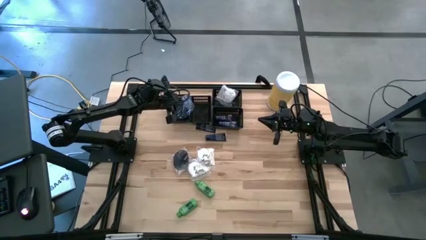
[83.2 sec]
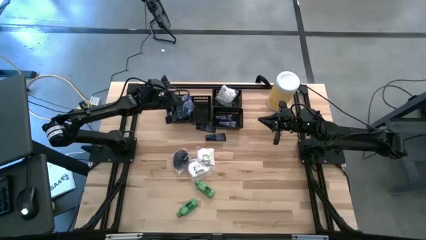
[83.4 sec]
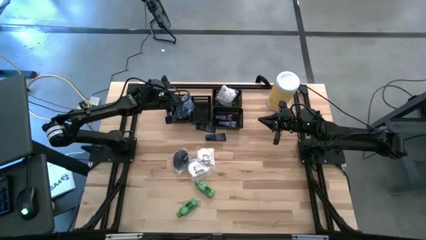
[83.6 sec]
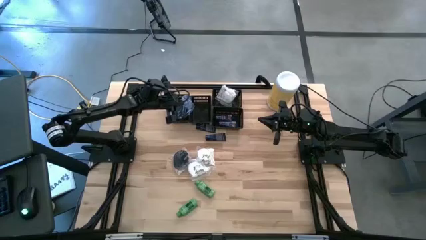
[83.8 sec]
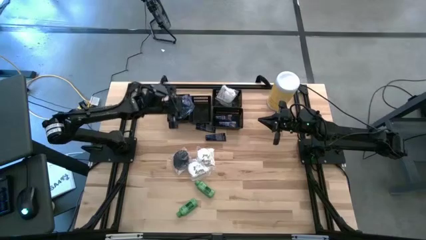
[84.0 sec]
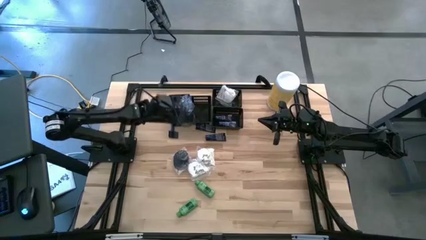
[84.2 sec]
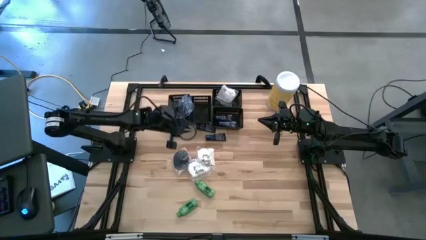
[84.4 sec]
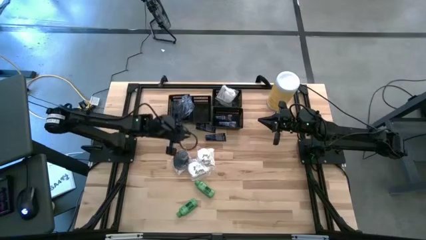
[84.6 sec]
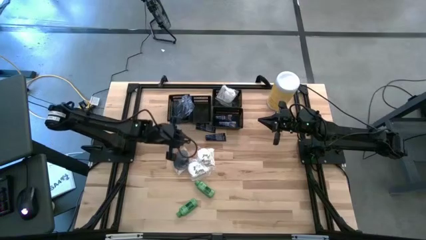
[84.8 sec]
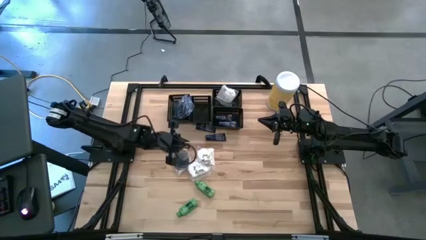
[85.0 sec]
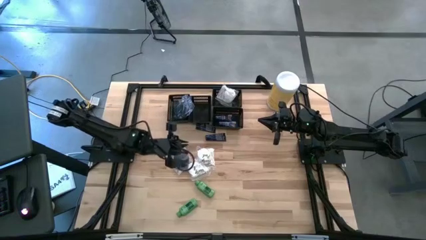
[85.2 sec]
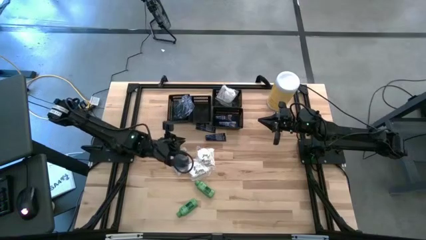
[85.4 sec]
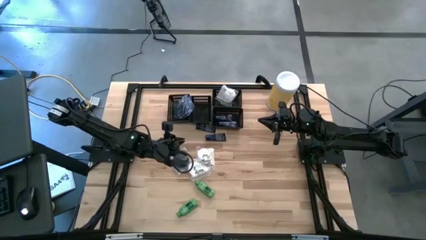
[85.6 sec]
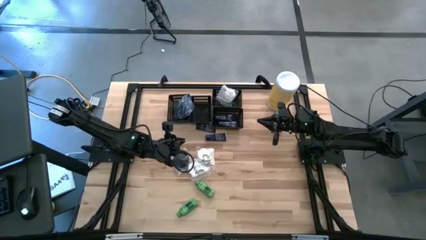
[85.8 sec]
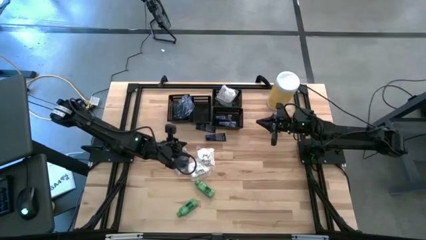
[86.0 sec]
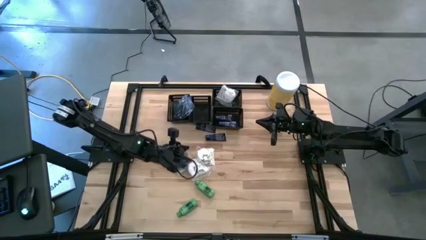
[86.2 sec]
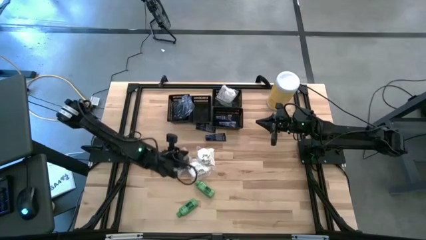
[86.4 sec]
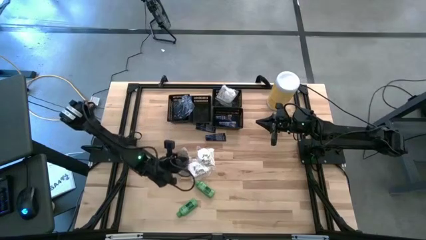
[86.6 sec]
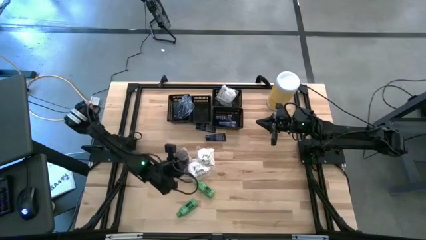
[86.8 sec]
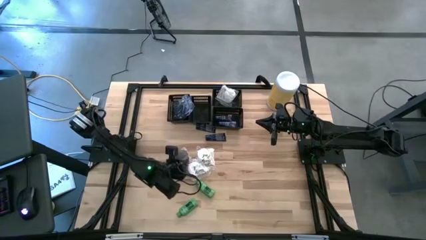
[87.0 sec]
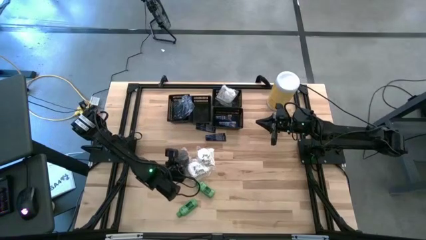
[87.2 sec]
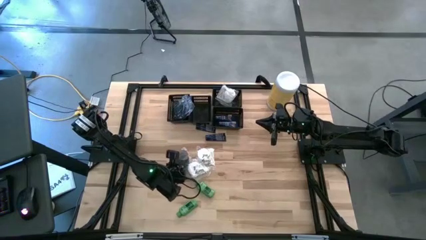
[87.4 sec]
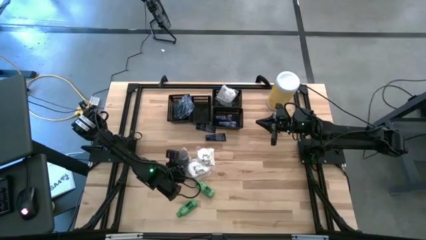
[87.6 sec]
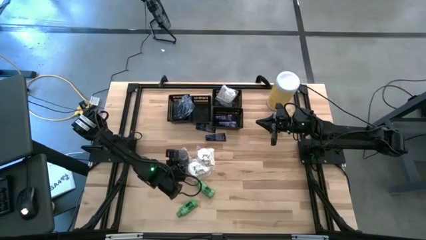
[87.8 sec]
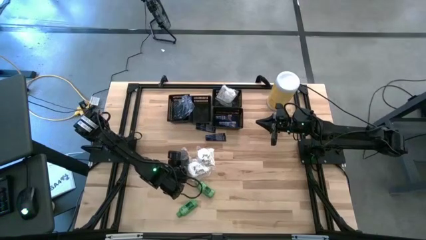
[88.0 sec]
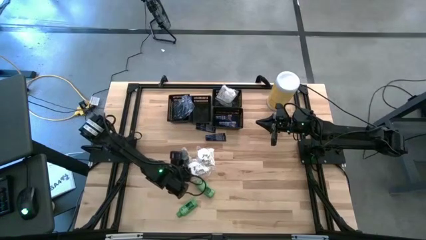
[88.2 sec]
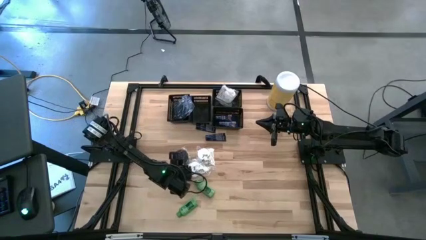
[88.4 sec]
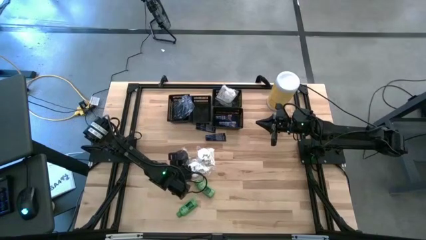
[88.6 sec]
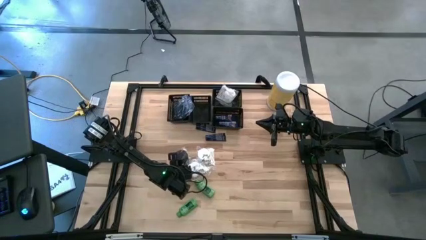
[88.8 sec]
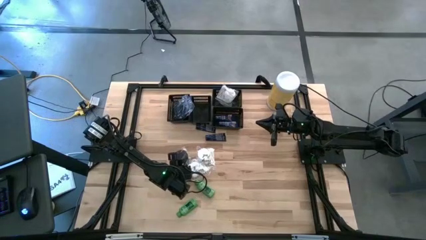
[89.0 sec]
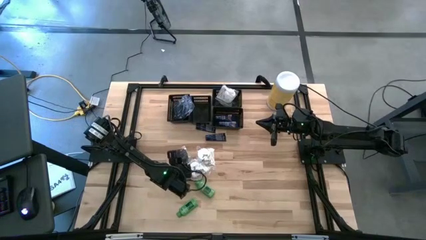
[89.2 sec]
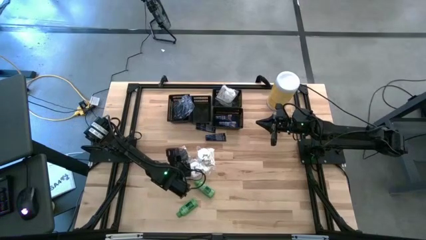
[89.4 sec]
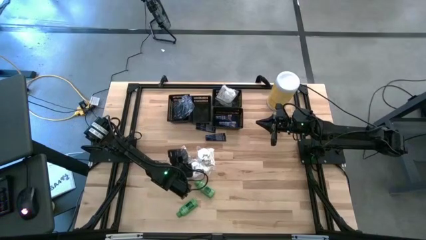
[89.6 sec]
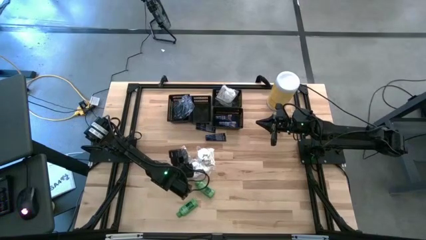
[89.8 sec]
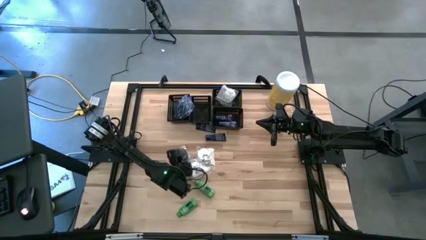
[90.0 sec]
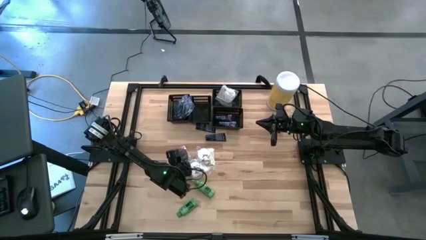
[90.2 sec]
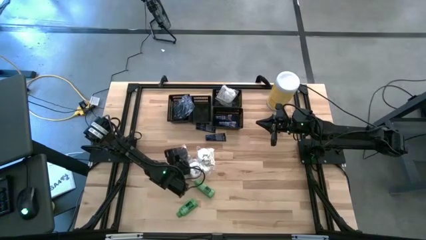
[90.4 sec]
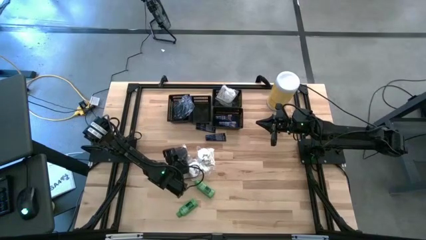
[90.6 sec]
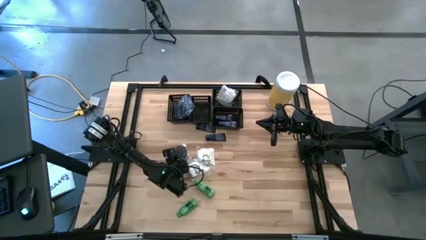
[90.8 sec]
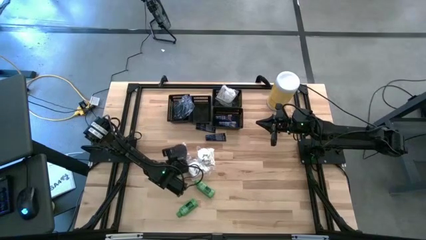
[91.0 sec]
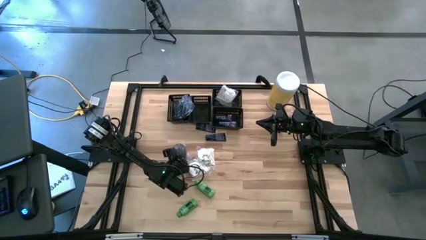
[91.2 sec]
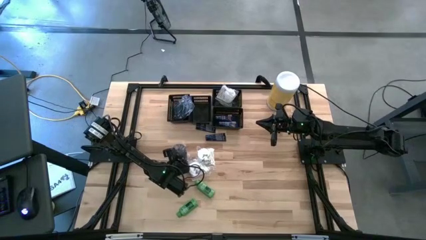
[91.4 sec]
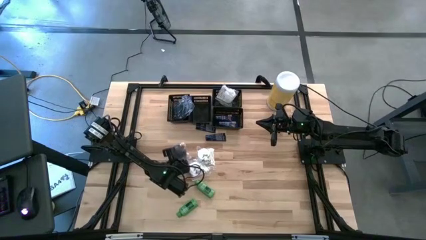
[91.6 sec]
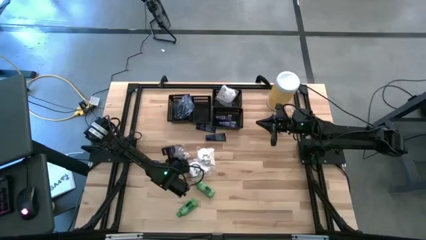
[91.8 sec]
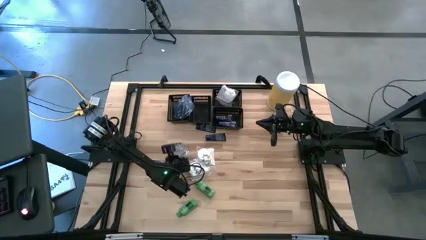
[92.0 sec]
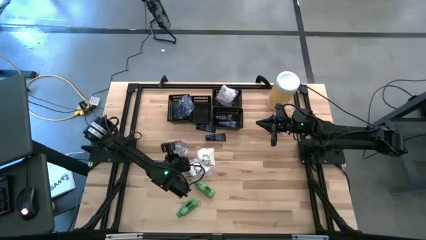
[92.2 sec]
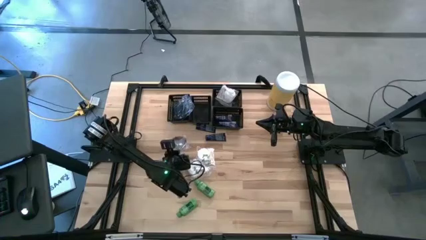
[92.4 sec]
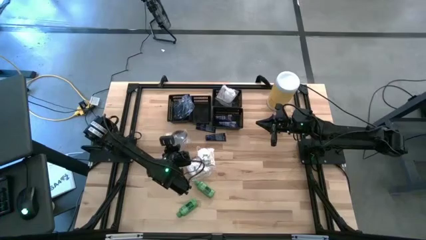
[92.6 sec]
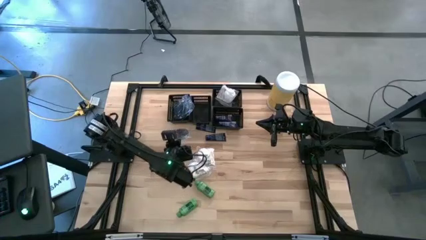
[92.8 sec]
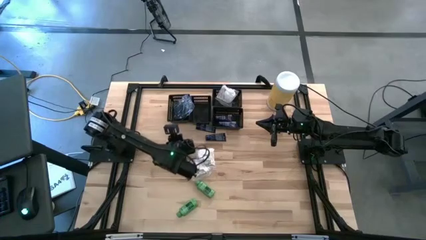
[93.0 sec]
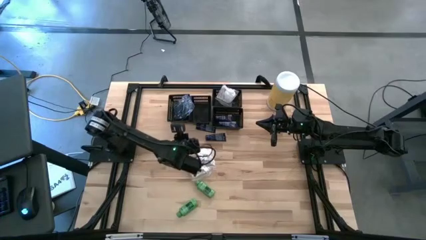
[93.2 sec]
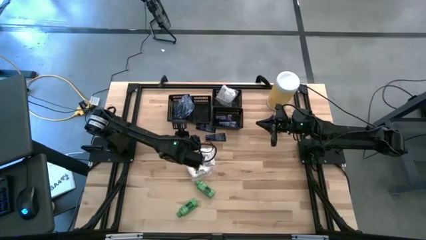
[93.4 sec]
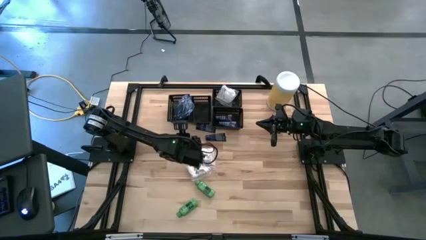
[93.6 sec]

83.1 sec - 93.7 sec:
Task: Pick & Place Travel size toiletries
Put the black hairbrush into the left black bin

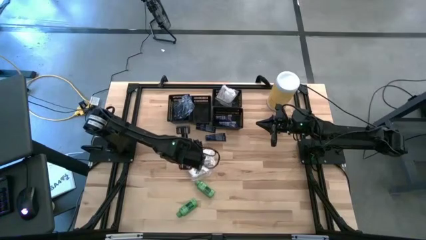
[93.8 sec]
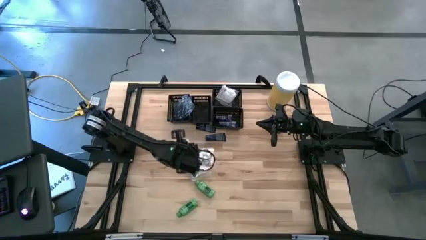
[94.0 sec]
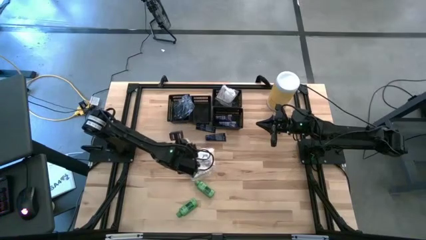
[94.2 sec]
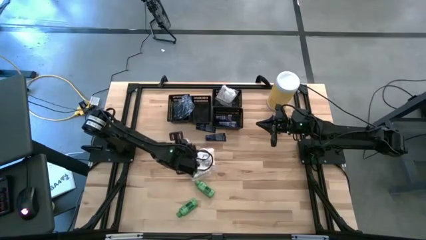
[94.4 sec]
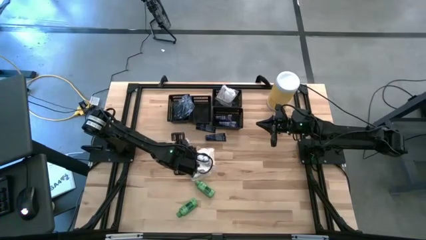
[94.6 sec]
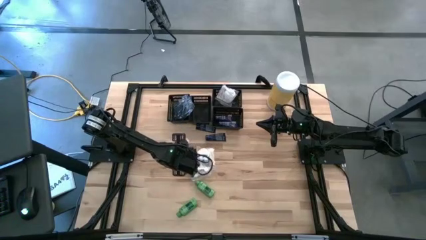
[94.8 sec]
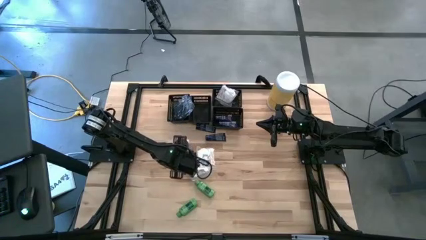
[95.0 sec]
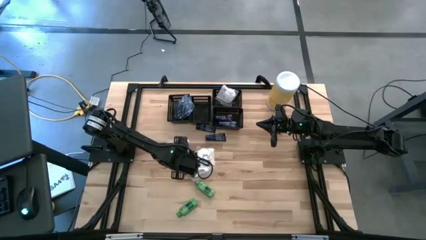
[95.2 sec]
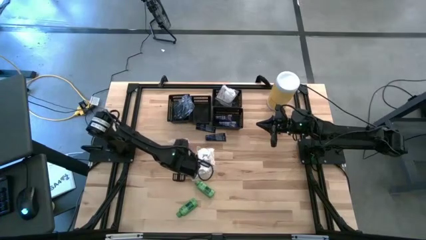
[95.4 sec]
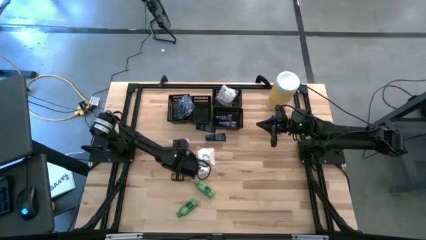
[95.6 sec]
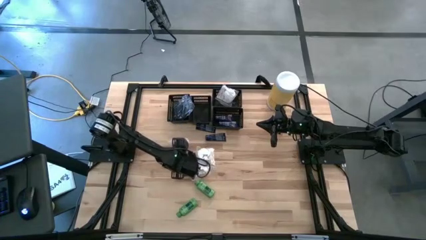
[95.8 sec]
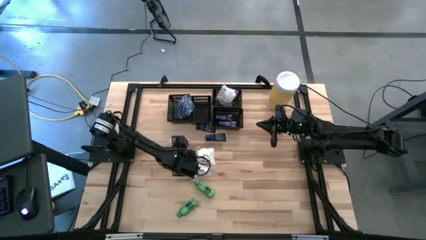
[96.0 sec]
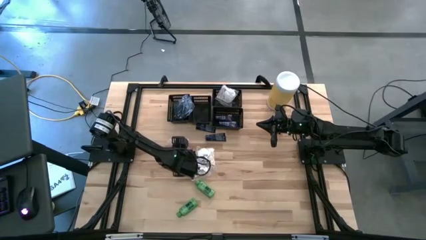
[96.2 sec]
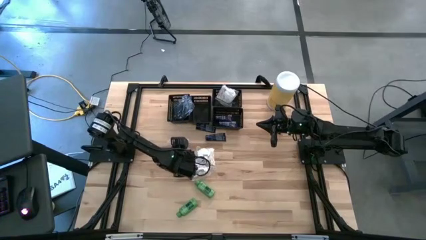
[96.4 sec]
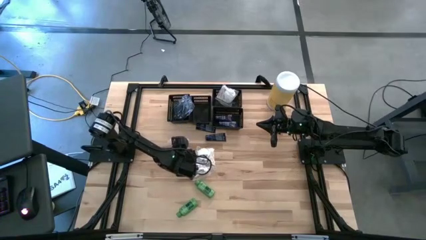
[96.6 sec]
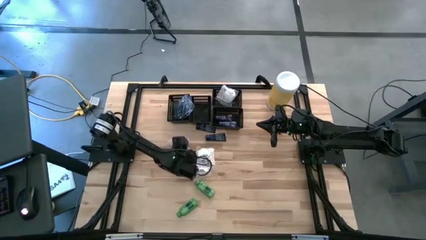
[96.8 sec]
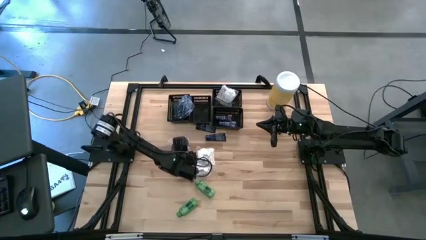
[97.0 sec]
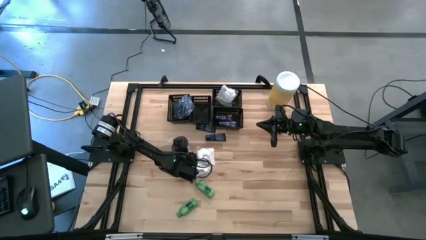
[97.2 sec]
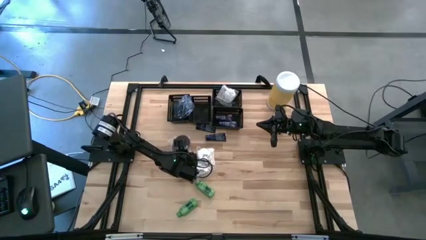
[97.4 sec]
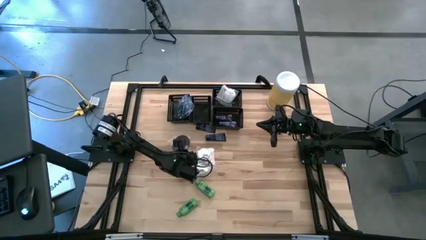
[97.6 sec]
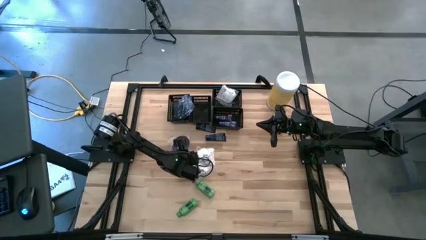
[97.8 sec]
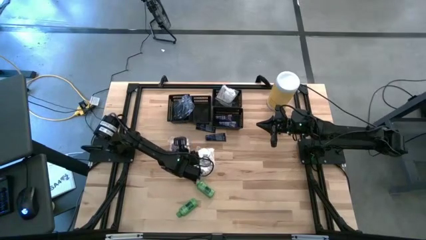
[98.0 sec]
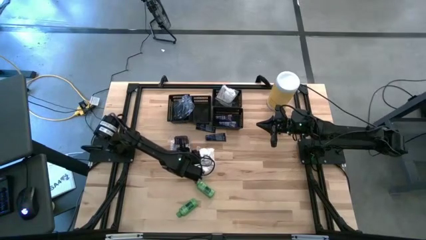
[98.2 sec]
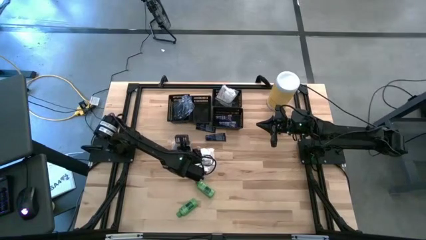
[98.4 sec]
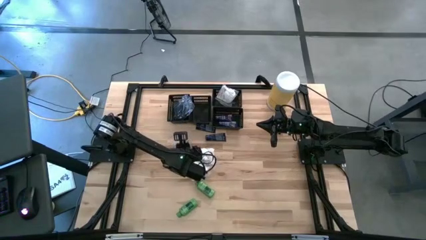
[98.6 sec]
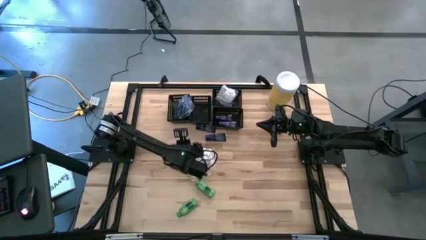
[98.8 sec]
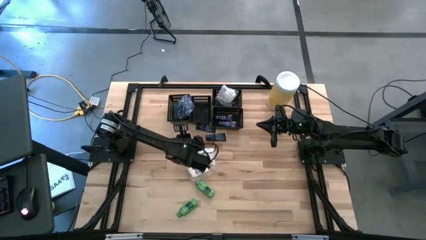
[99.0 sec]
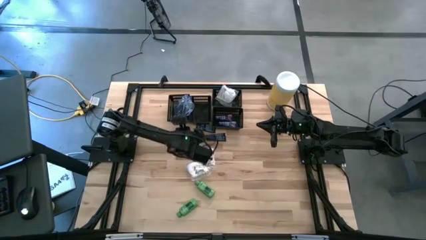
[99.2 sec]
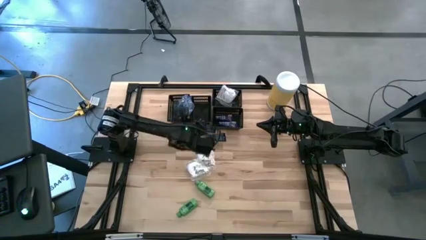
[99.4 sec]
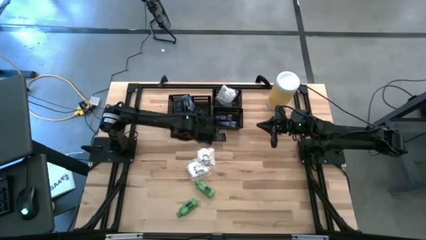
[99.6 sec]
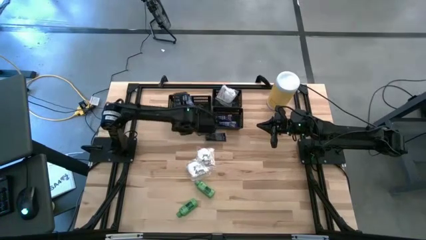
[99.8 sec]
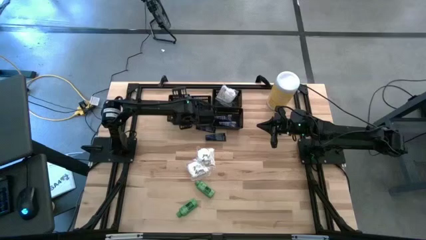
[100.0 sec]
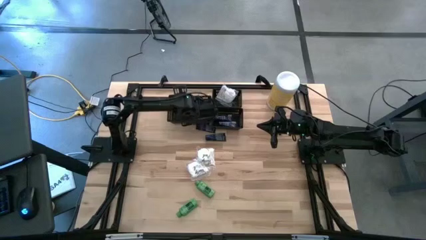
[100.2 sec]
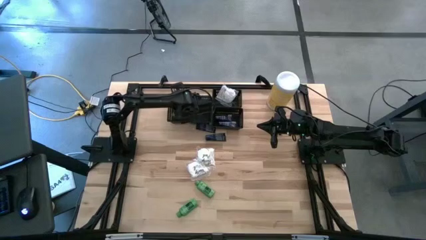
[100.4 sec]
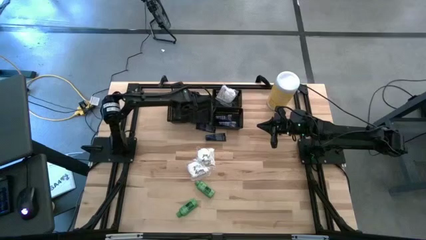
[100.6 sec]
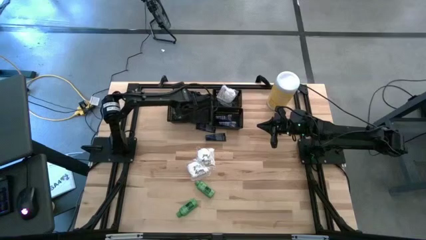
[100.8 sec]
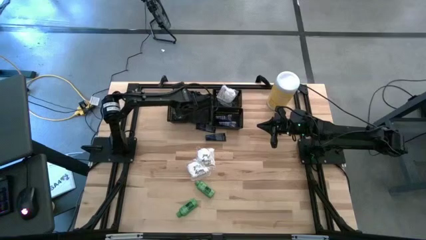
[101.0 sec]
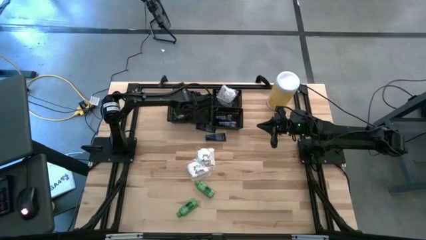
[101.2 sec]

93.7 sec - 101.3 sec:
Put the black hairbrush into the left black bin
